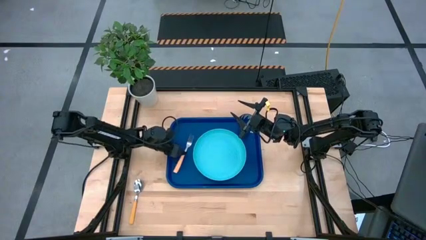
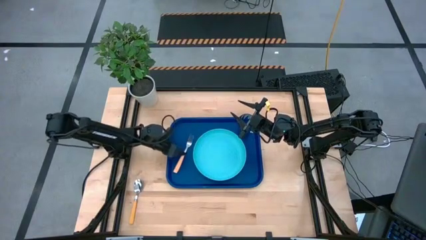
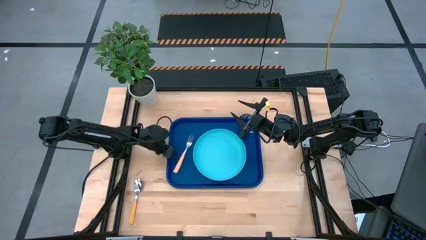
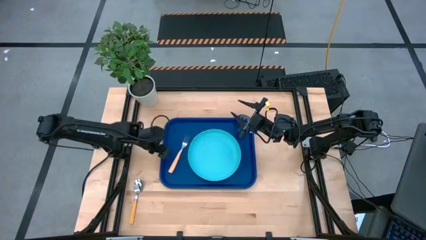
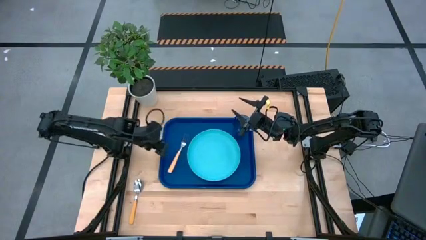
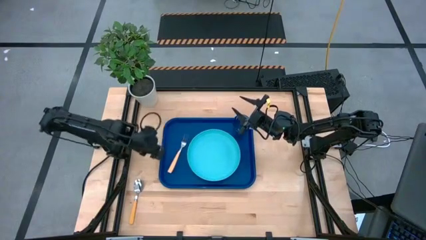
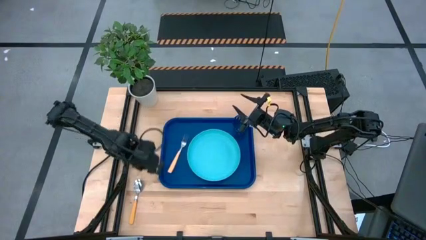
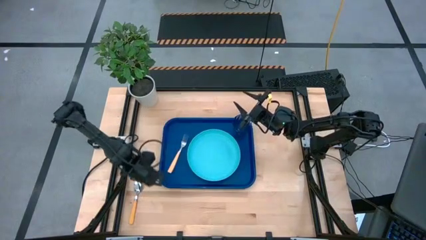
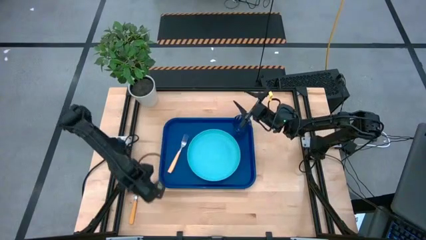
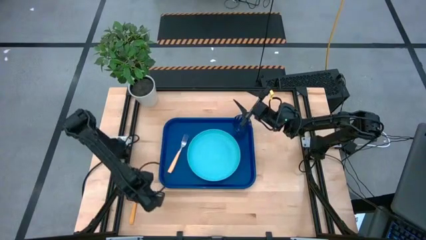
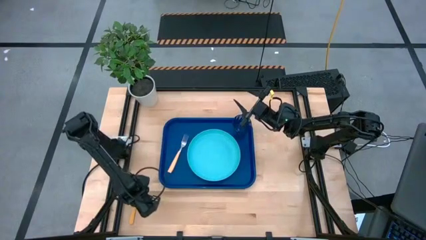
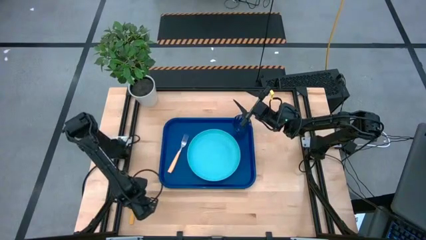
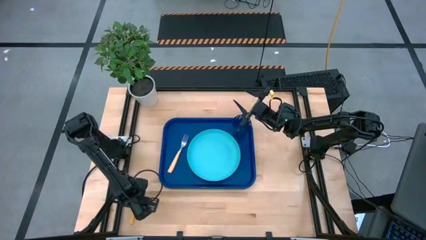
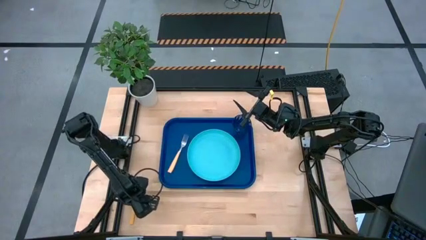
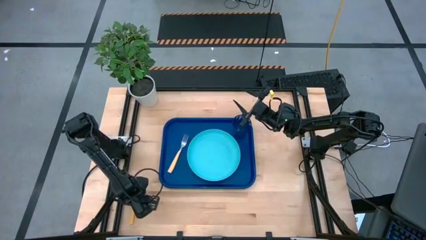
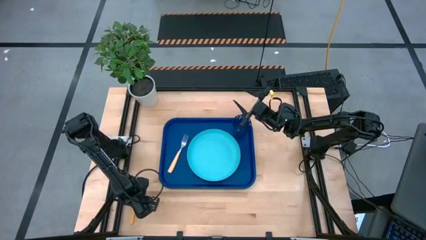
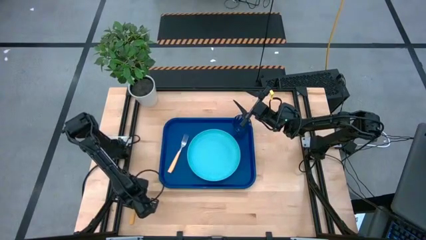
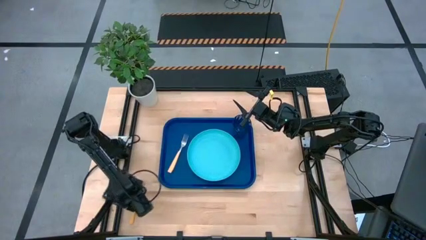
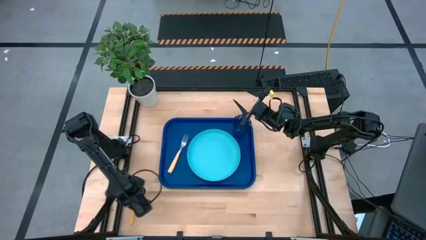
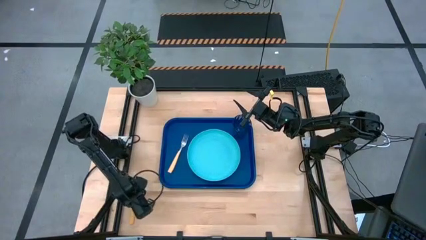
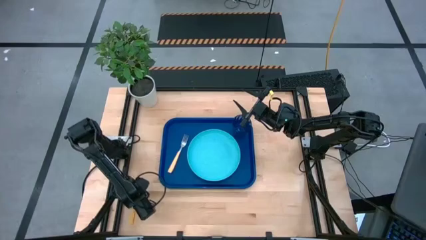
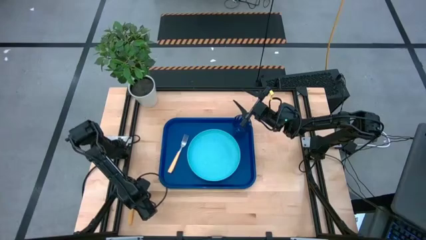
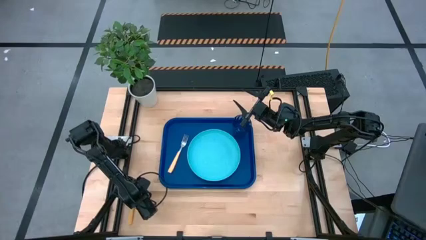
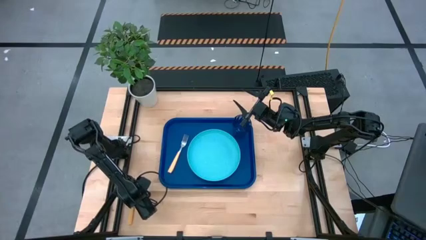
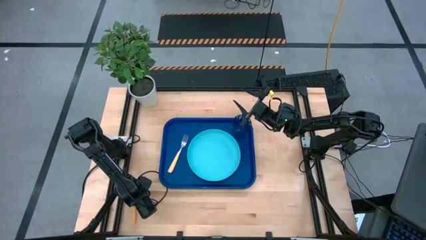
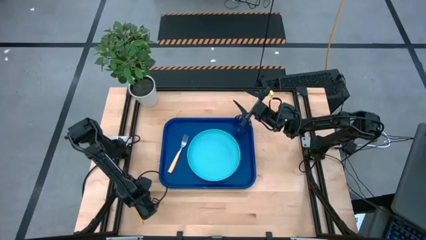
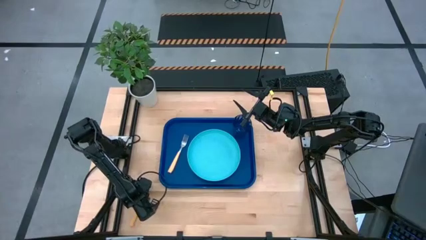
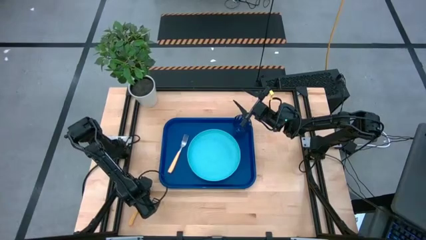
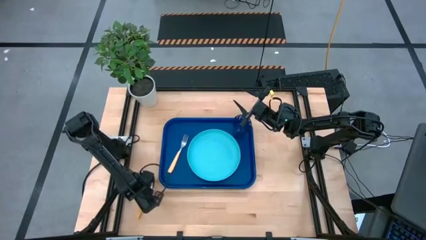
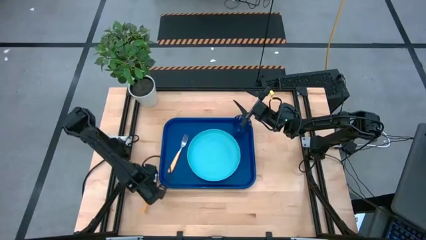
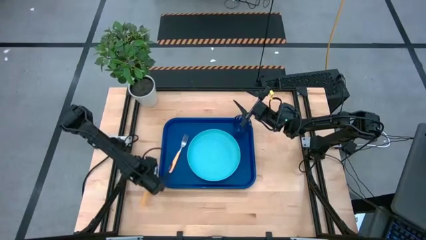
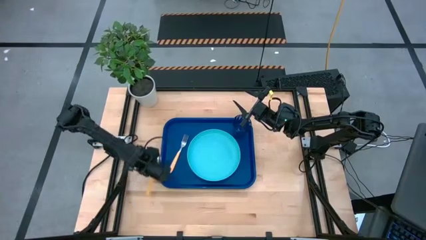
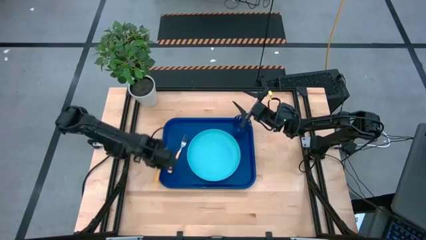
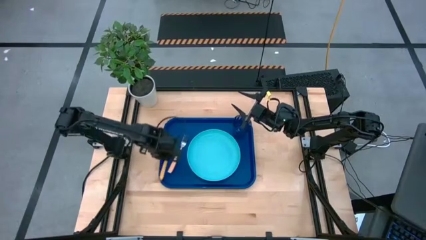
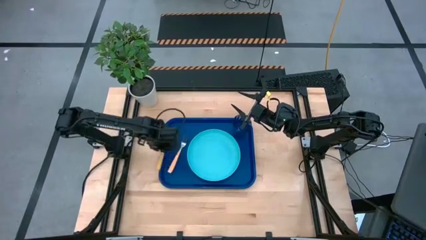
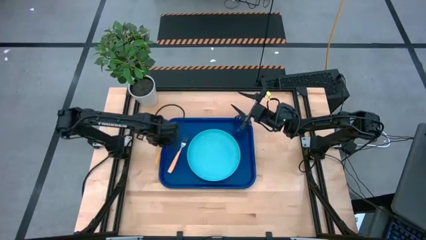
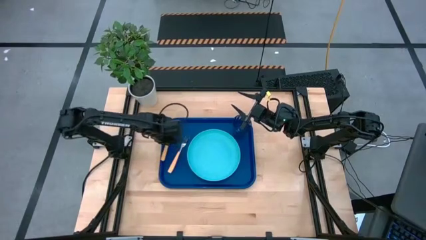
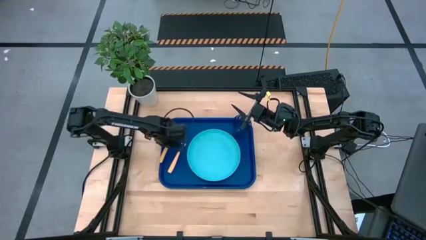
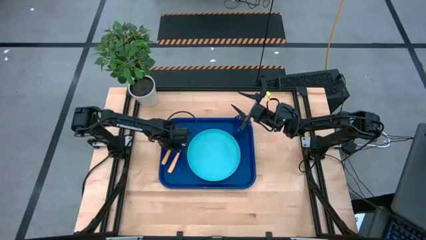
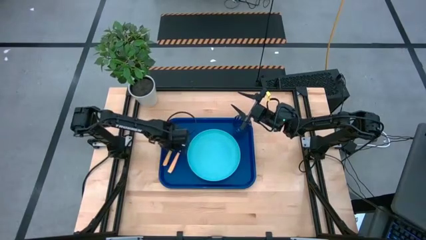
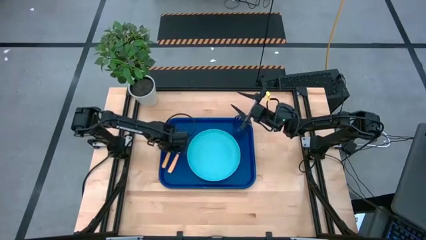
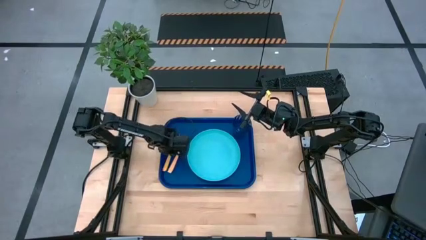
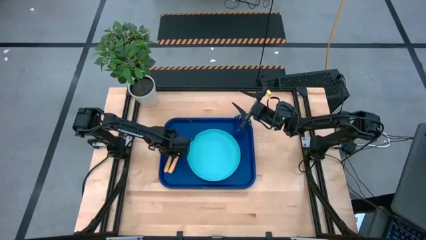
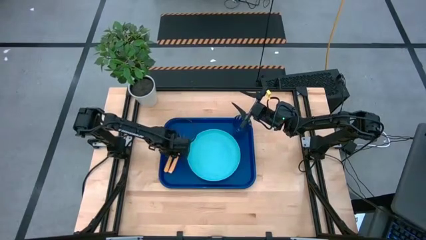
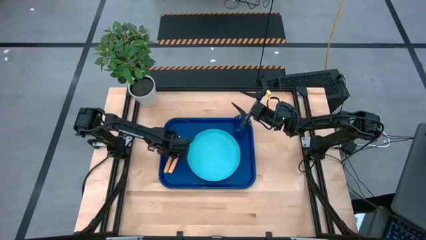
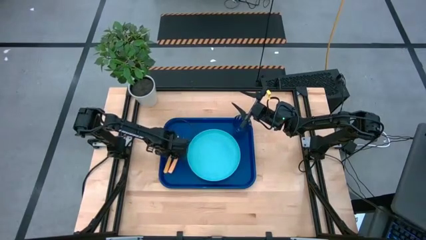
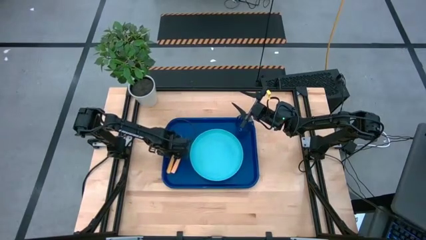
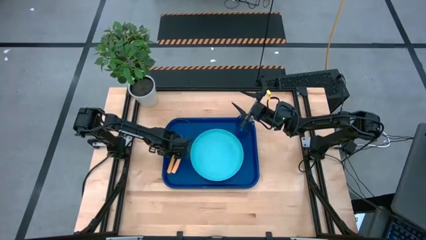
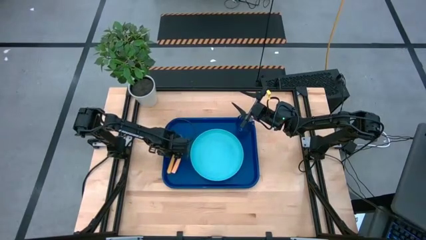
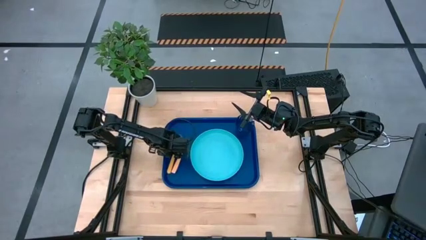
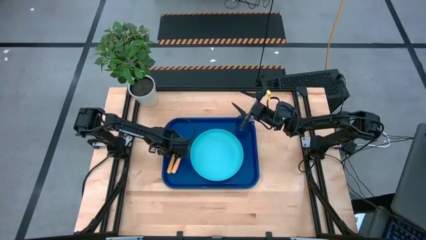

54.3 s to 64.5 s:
Task: Pick and place plate/cup/fork/spoon on tray
Put the orange spoon to the left of yellow fork on the blue serving tray

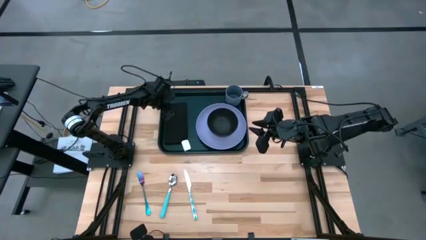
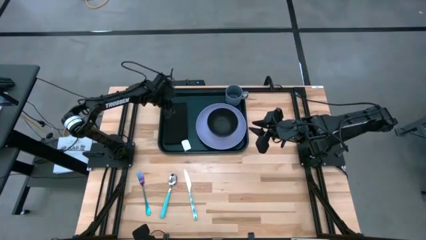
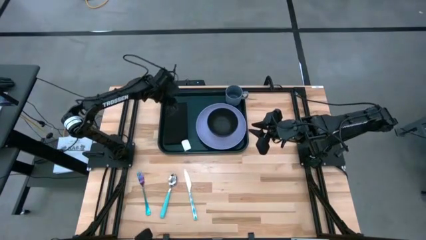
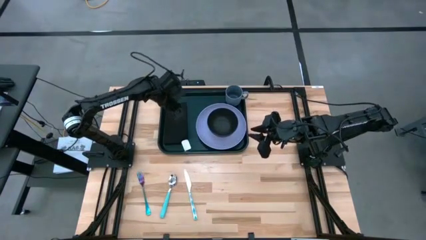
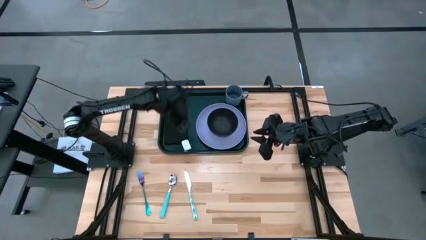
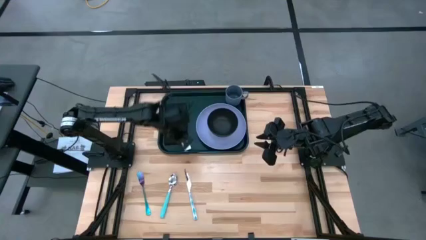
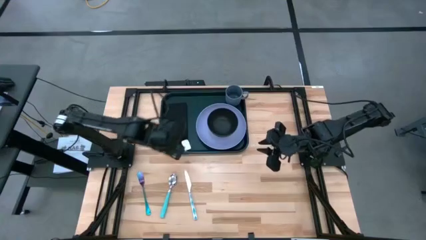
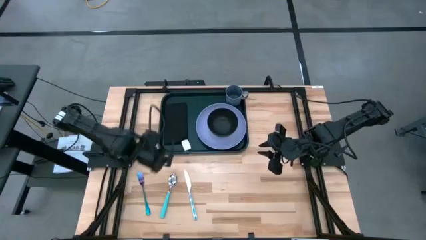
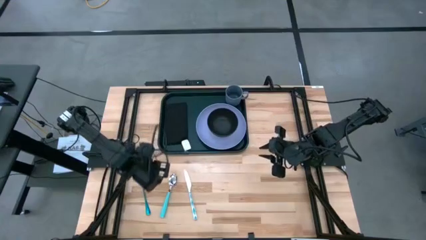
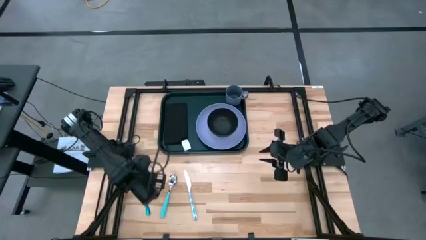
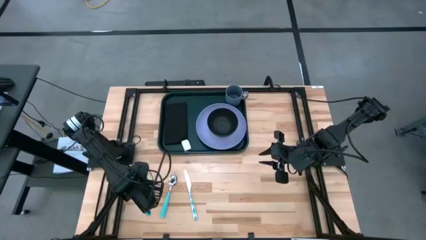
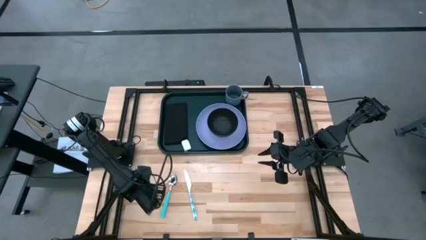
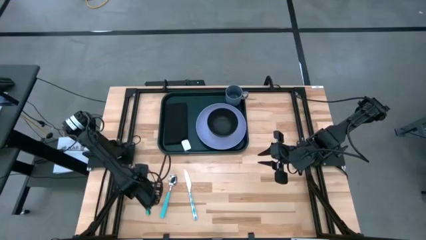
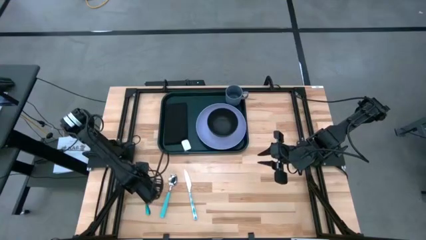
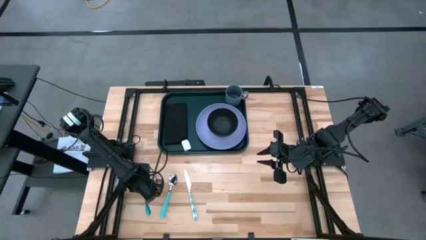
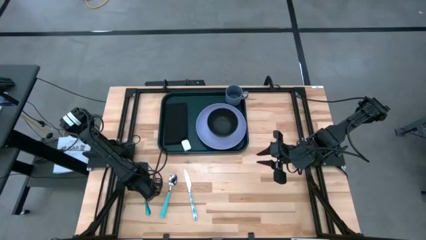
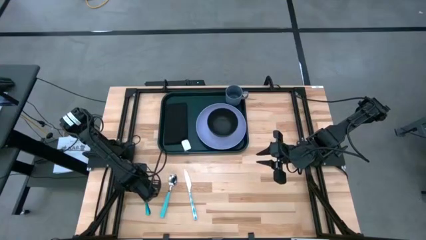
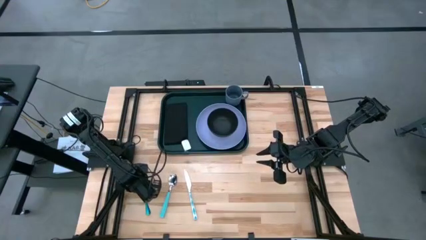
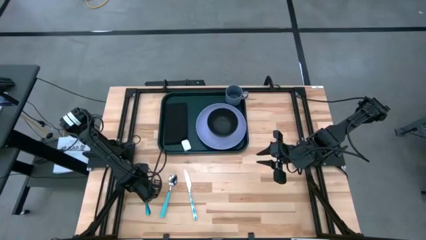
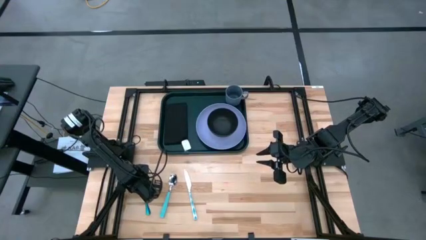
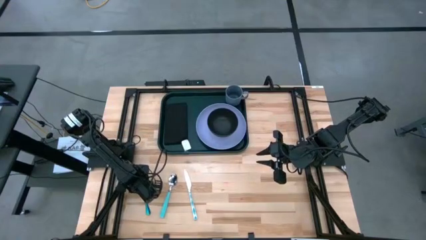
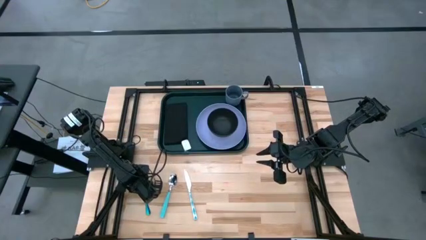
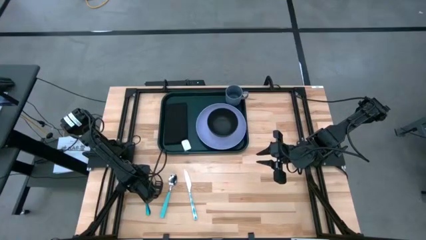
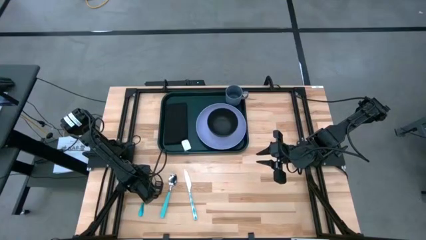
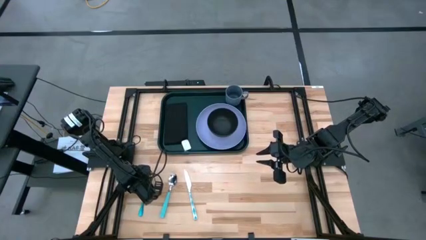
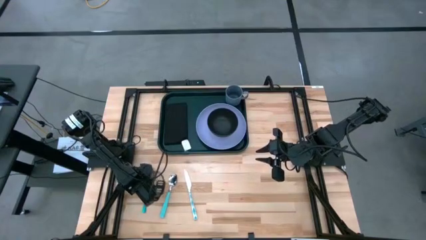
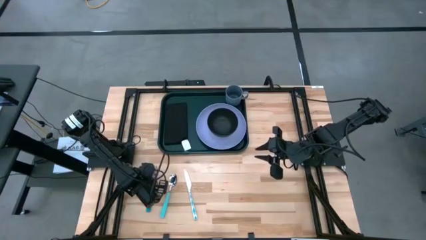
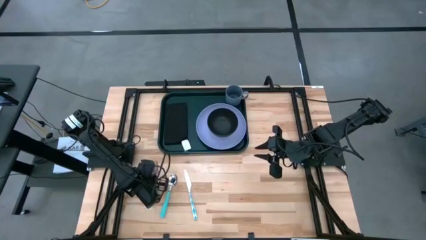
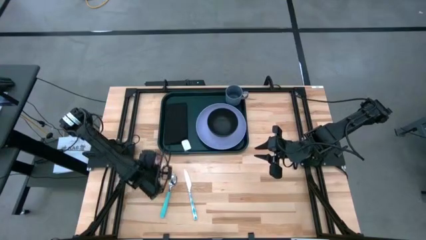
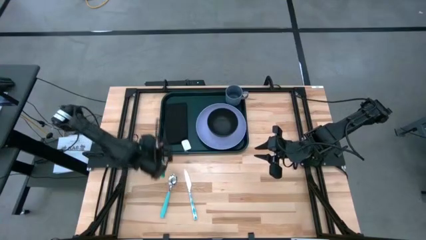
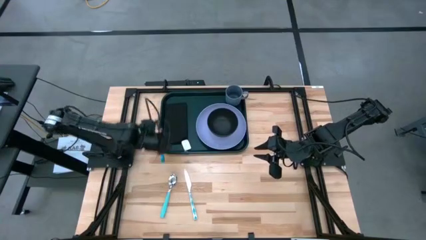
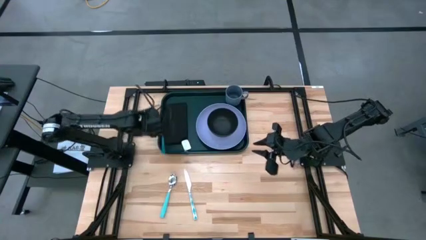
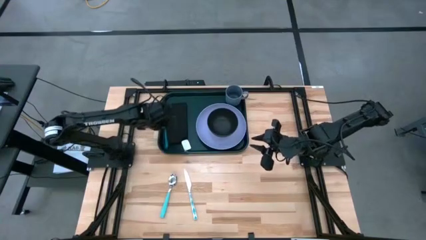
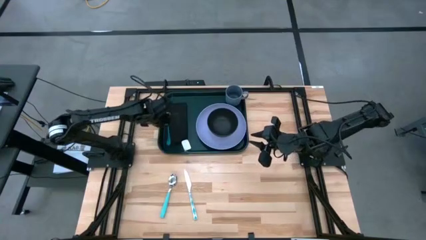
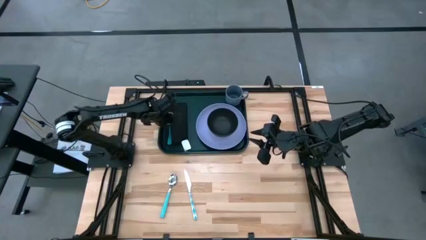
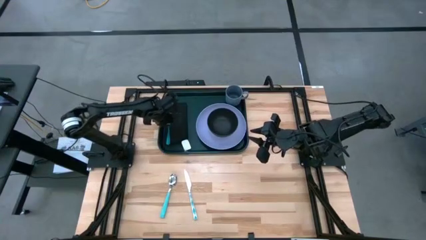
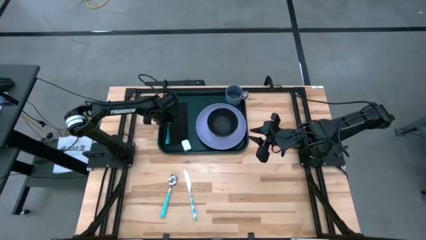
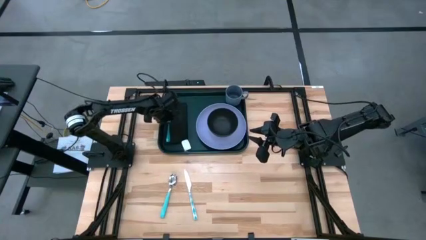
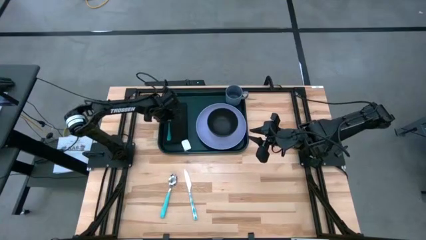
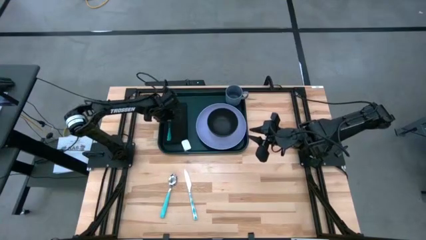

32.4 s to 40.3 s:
Task: Set up tray
Put the blue fork on top of the black napkin on the black tray
